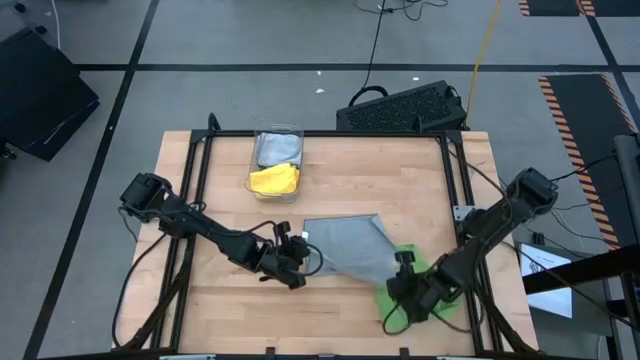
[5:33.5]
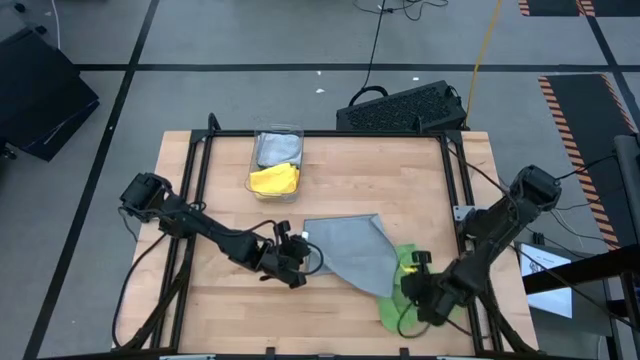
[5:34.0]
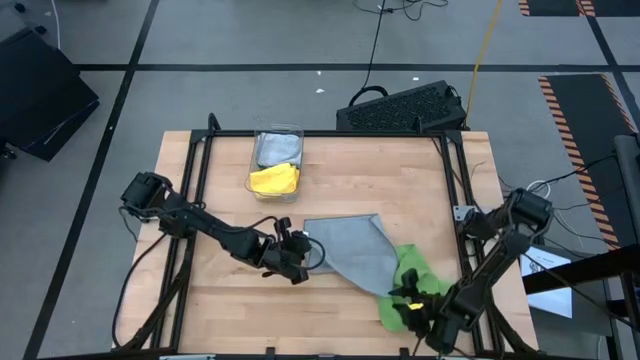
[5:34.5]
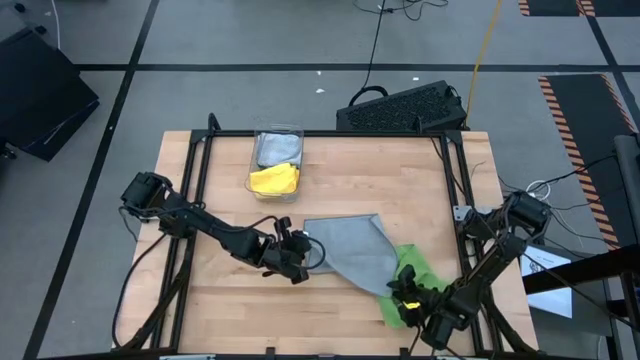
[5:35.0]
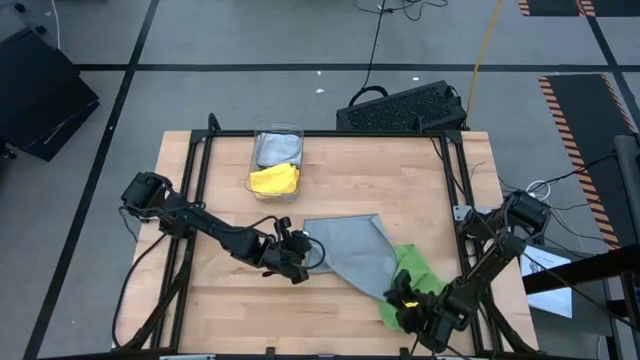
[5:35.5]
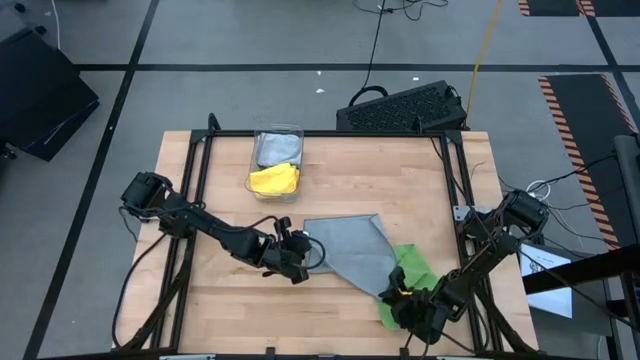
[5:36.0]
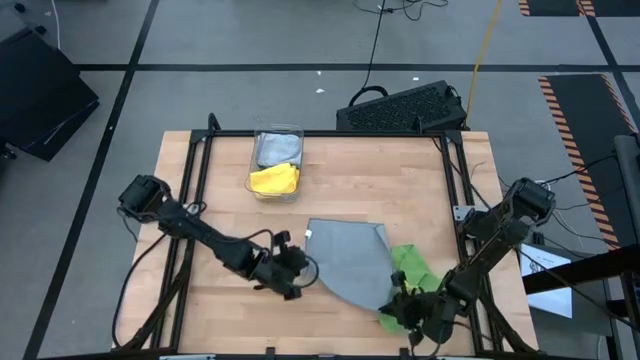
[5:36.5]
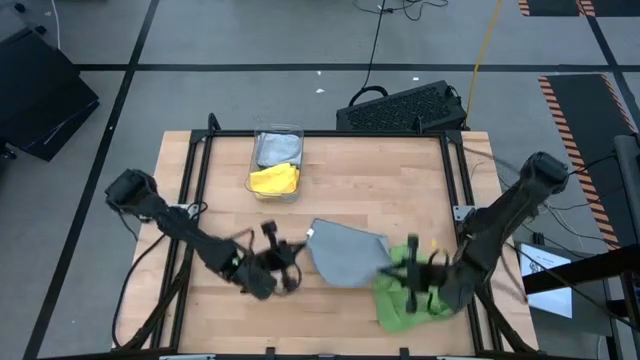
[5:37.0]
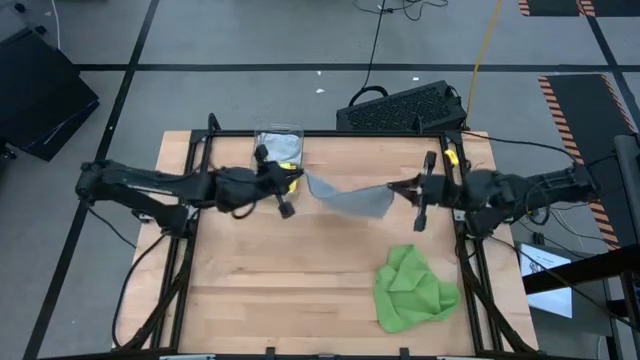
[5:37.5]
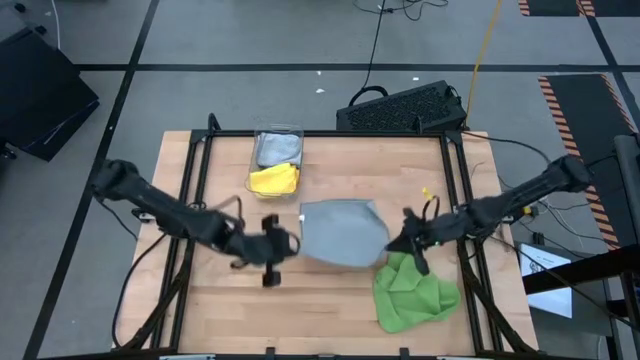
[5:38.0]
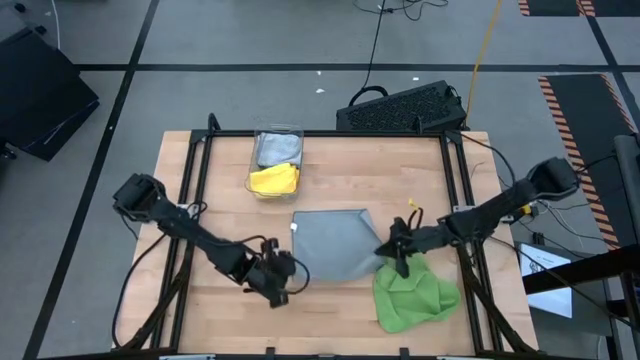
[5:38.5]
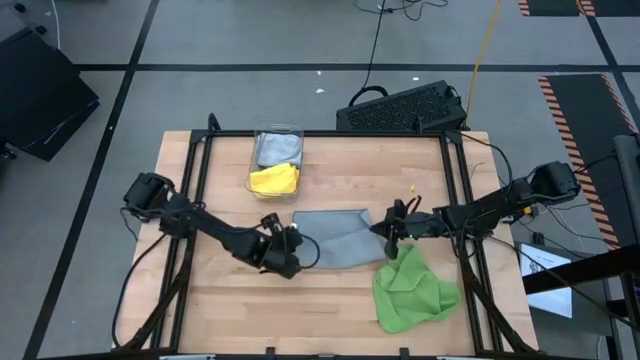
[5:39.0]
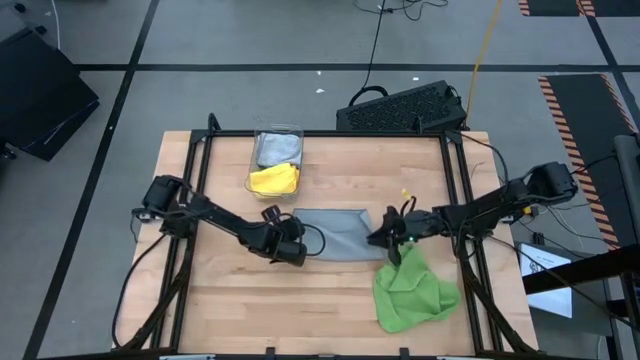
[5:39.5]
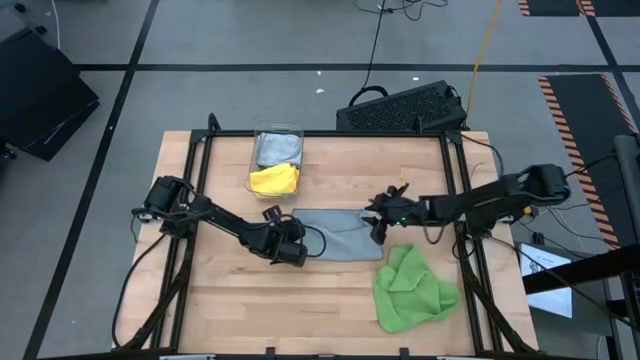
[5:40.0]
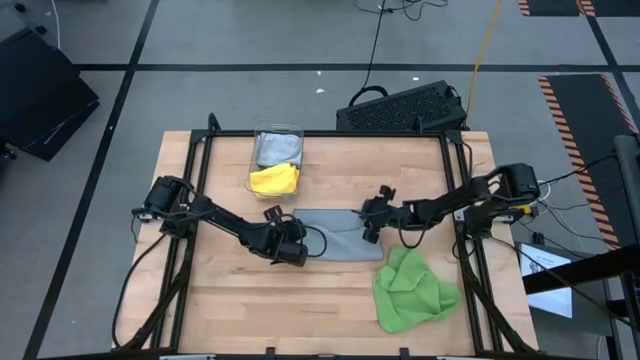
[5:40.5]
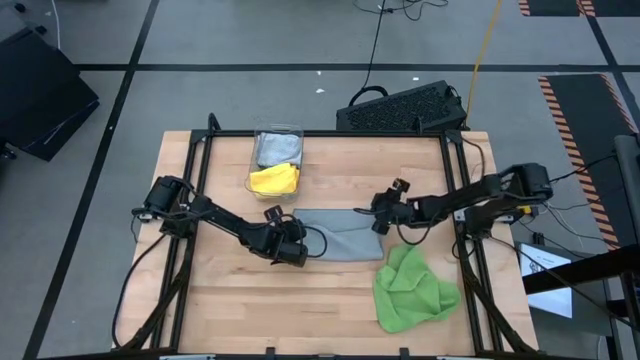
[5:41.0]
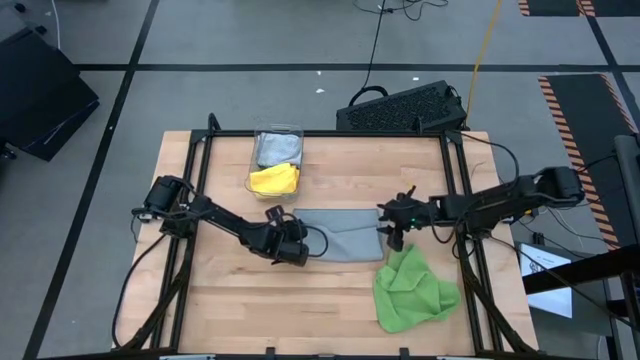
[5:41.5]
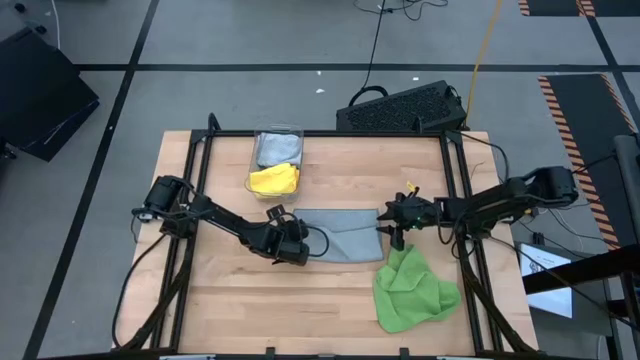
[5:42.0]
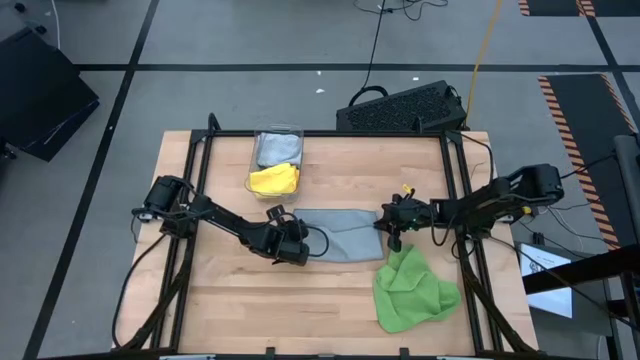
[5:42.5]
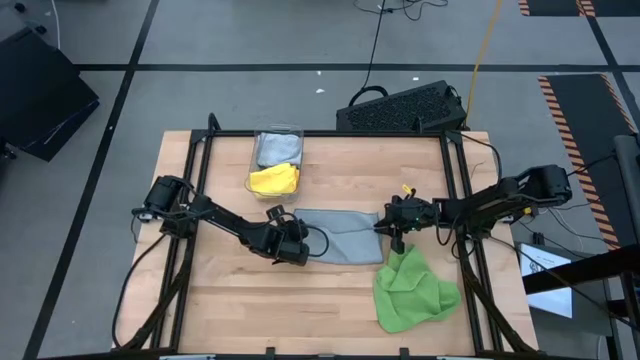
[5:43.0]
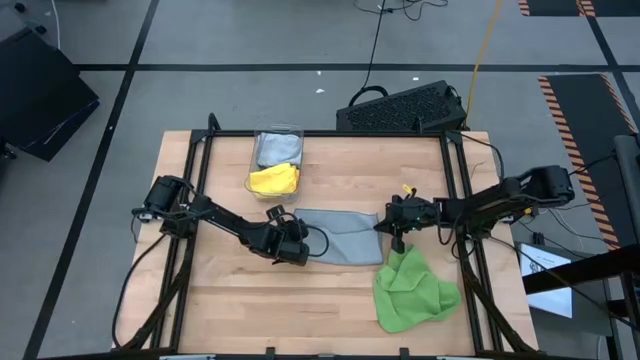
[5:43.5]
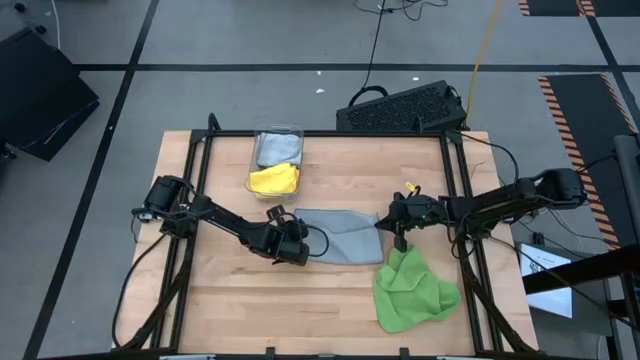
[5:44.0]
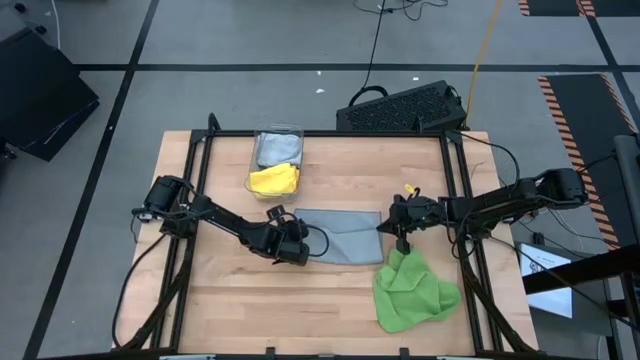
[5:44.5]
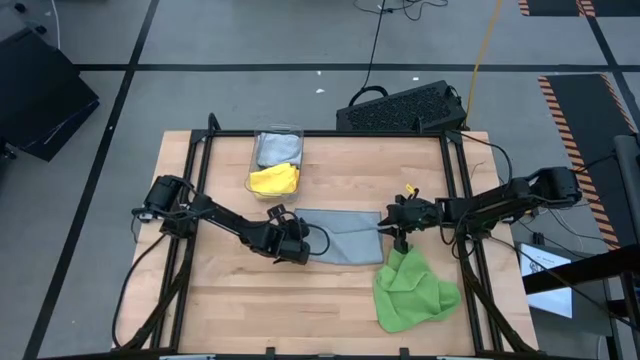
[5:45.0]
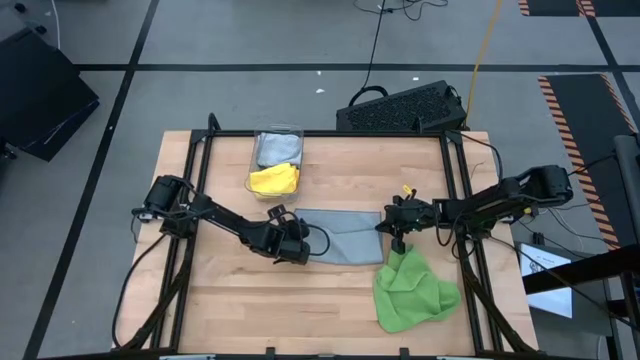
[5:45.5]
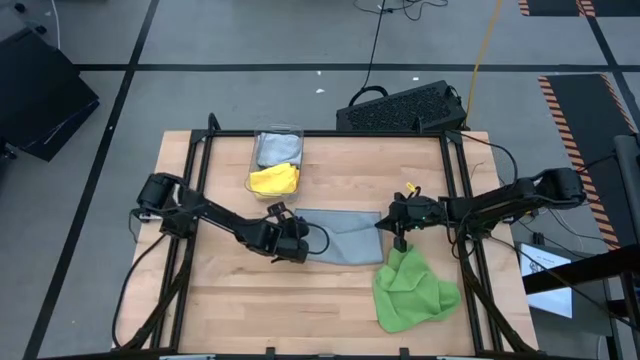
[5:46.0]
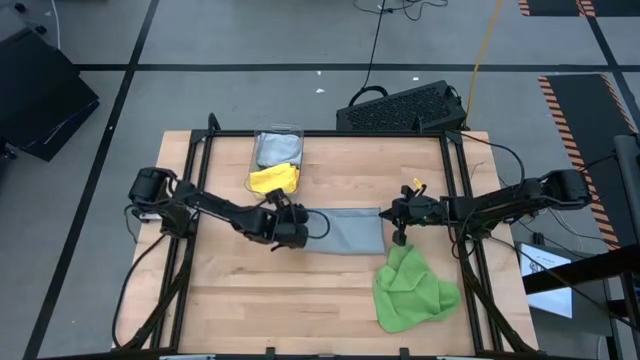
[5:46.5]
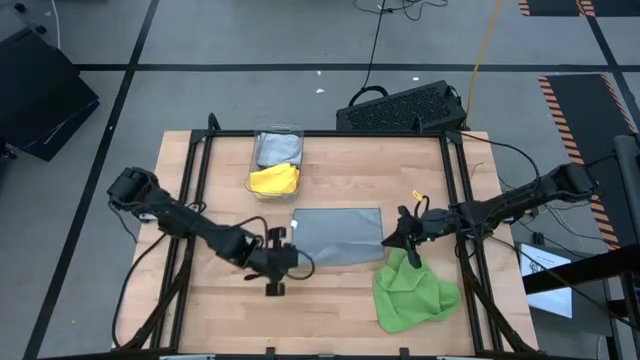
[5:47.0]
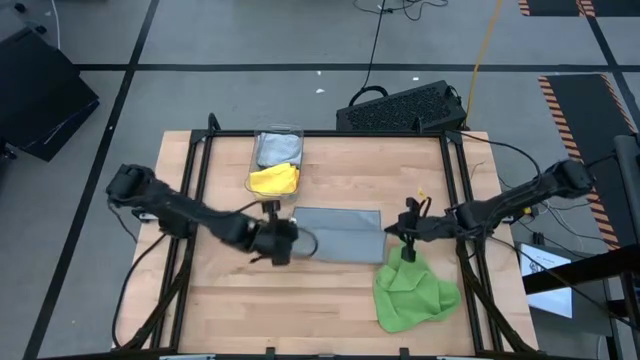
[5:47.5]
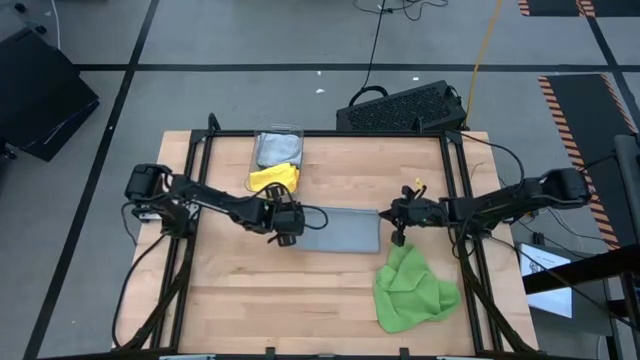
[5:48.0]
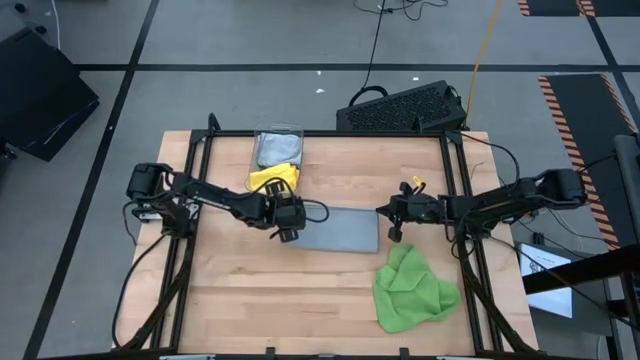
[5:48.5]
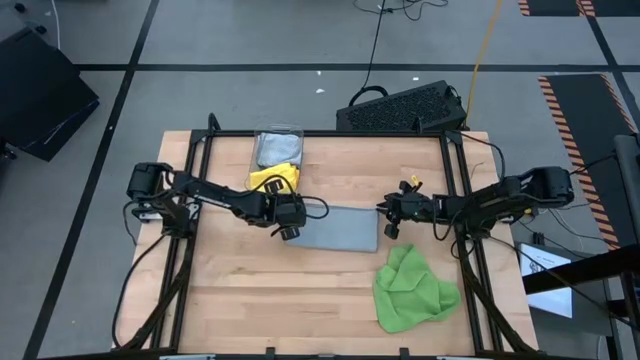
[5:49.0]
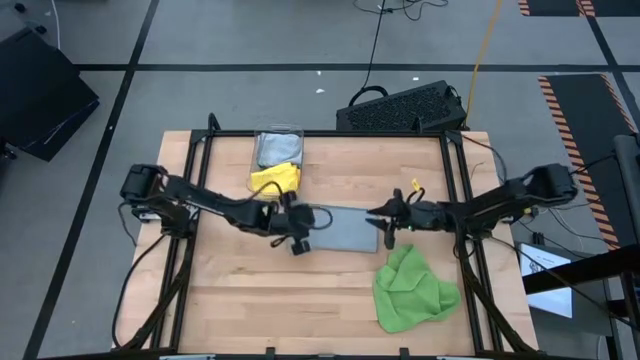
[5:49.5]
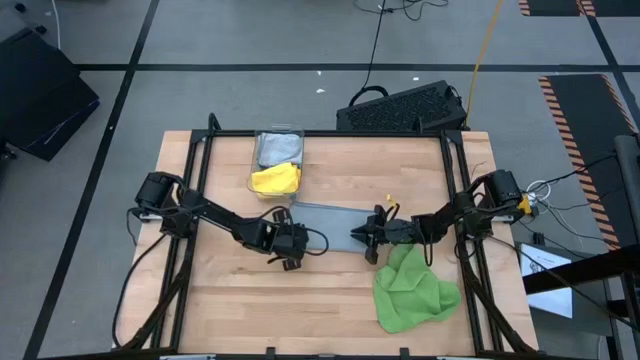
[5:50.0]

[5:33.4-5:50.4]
Task: Fold microfiber towels
Fold the gray towel on the table

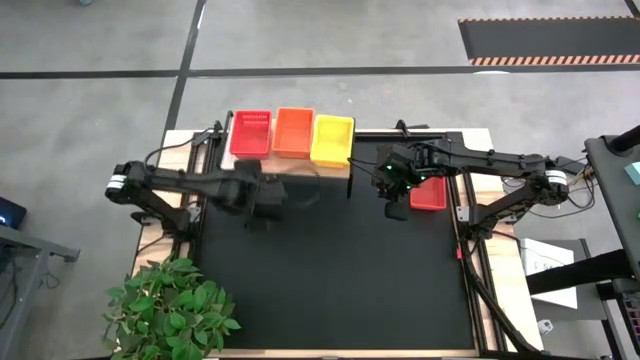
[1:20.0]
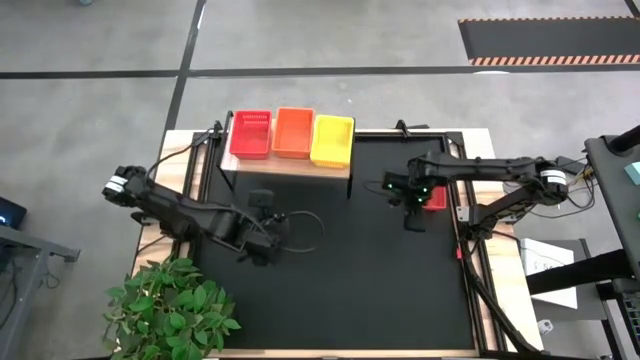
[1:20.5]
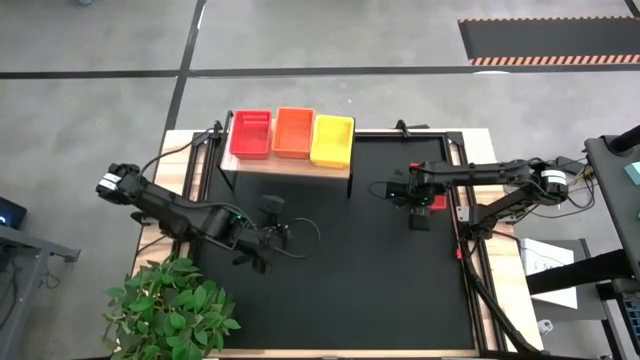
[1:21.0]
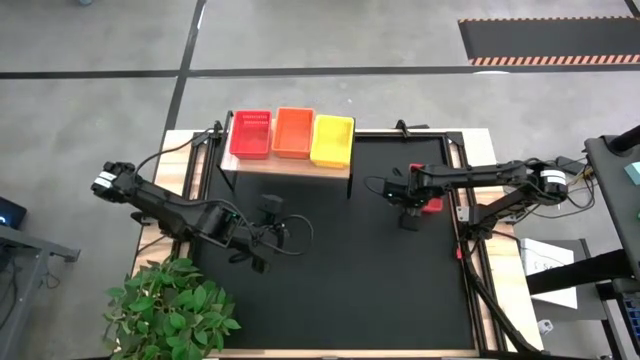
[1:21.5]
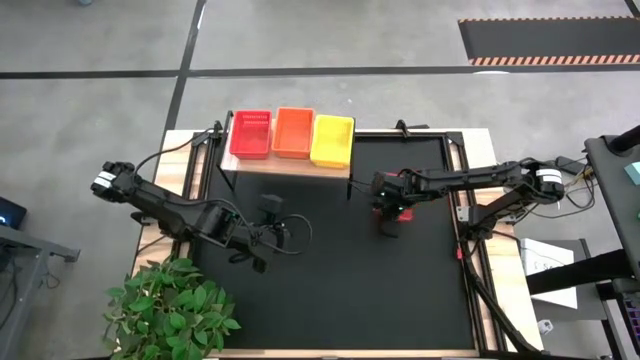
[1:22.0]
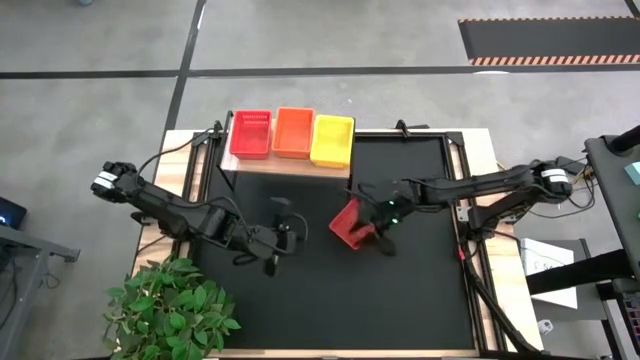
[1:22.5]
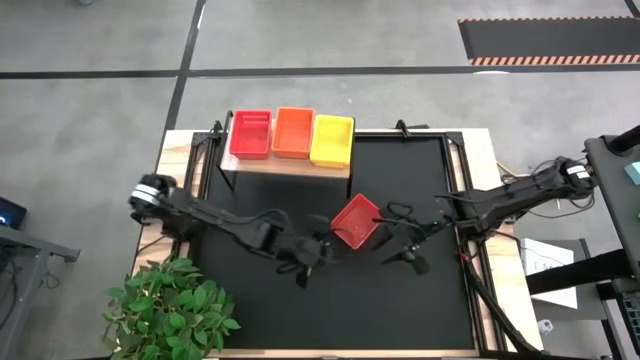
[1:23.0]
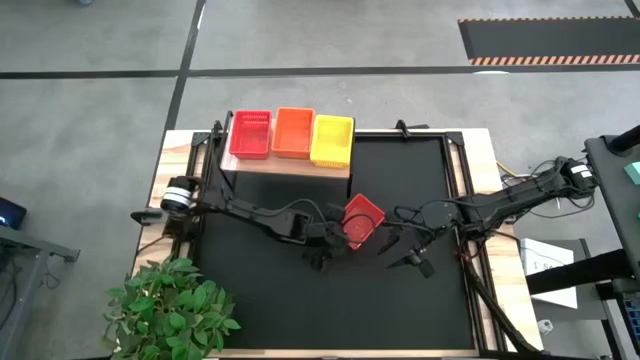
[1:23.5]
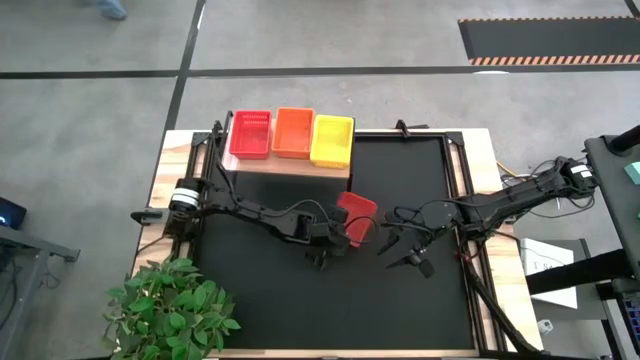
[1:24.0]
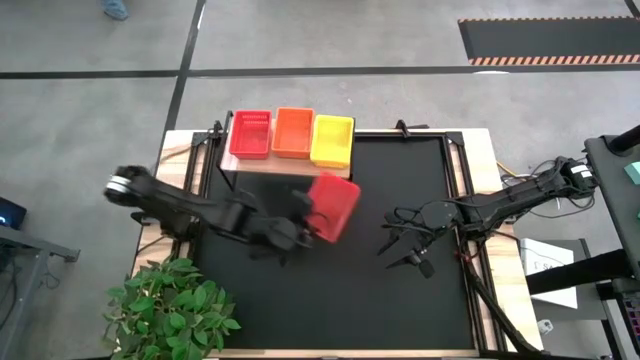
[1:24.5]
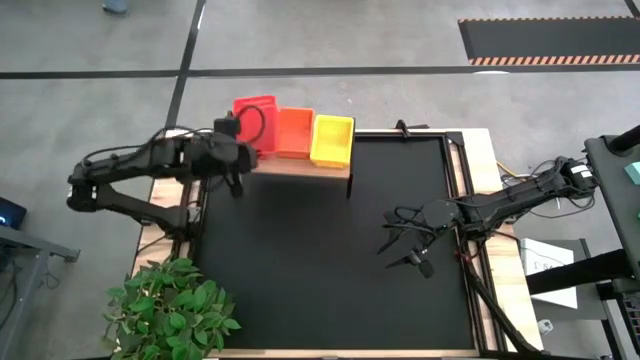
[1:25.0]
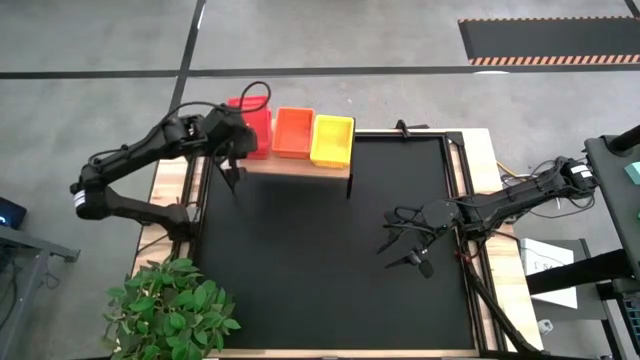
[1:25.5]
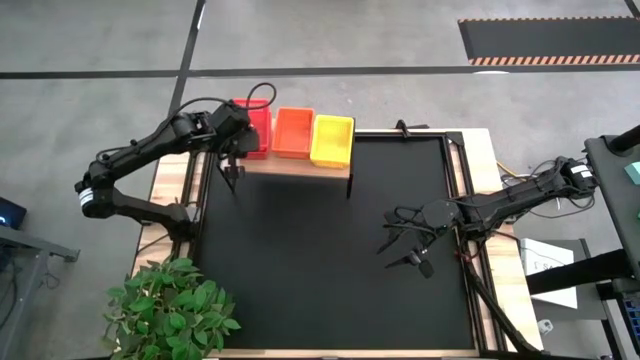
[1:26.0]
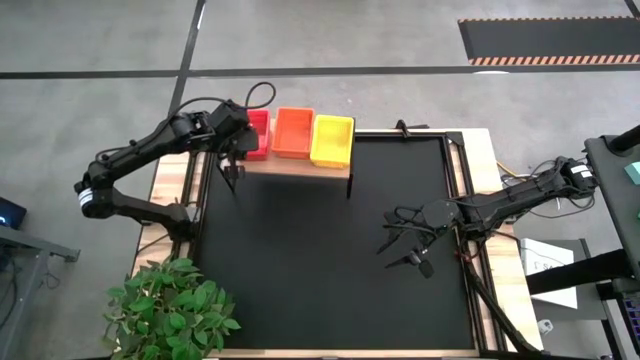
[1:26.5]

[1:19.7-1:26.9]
Task: Stack baskets on shelf by color
Stack the red bin on the other red bin on the shelf
